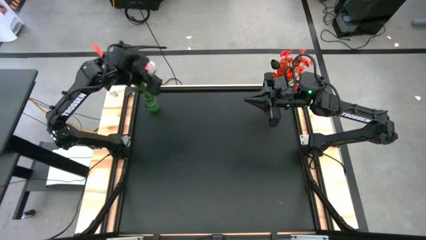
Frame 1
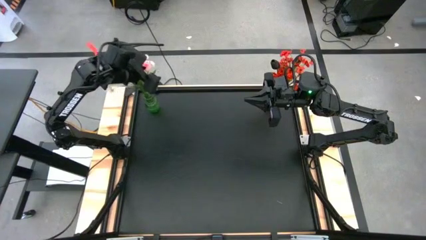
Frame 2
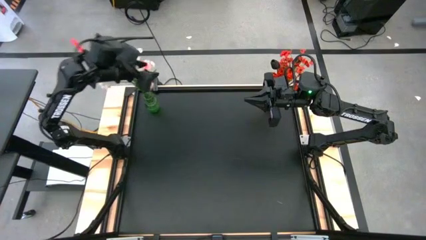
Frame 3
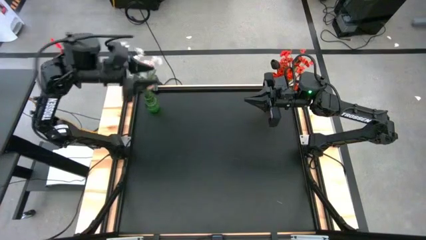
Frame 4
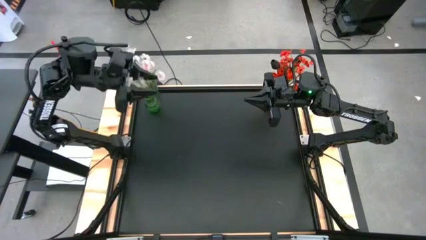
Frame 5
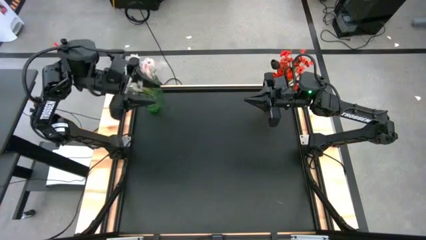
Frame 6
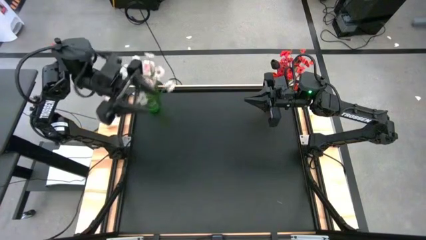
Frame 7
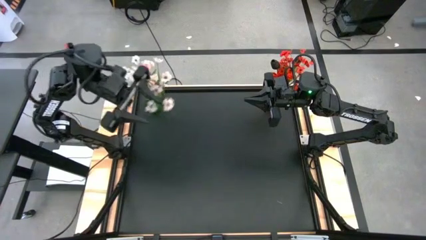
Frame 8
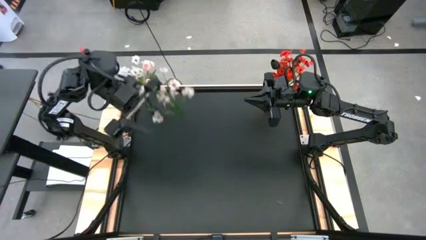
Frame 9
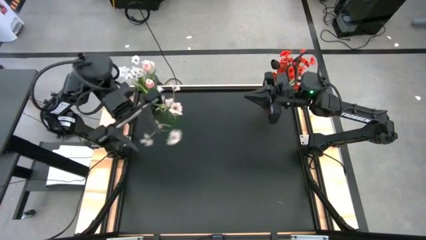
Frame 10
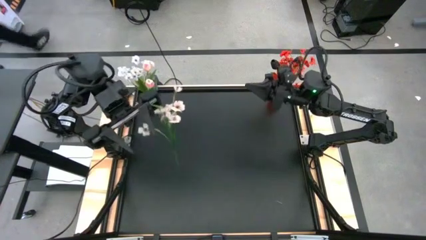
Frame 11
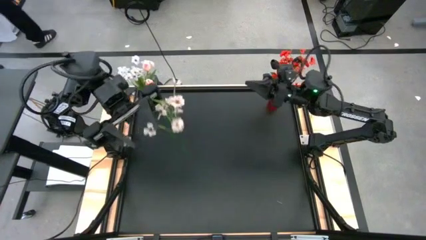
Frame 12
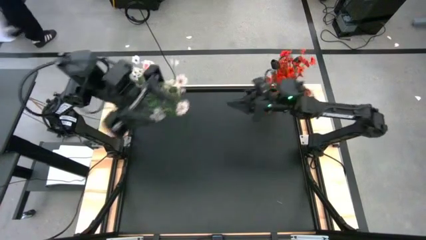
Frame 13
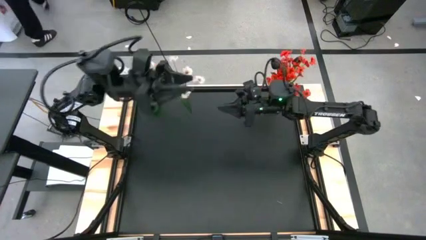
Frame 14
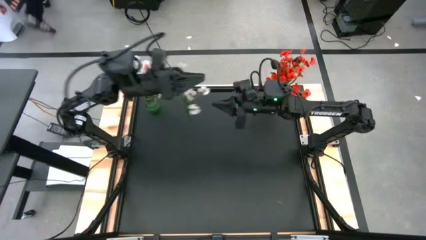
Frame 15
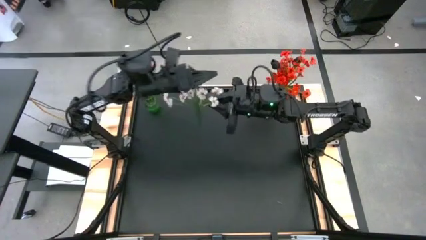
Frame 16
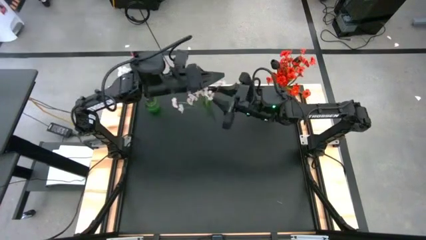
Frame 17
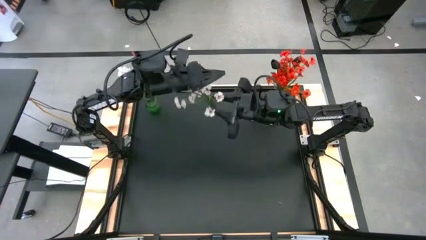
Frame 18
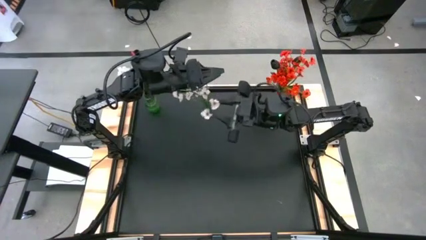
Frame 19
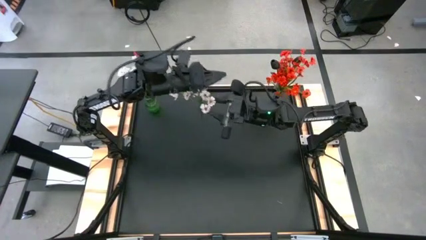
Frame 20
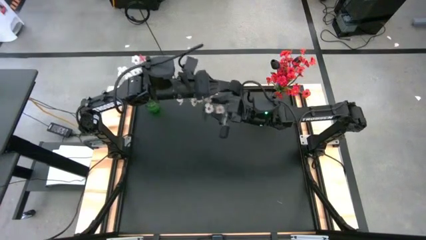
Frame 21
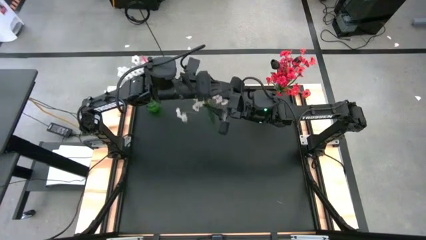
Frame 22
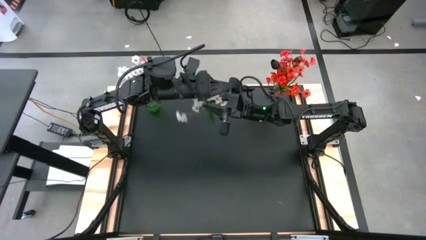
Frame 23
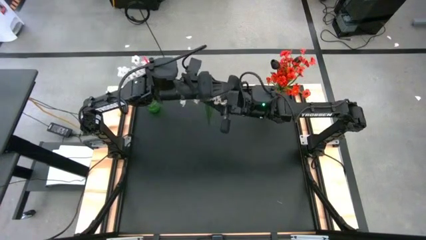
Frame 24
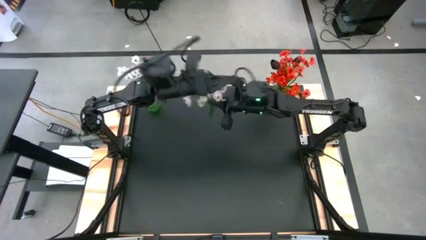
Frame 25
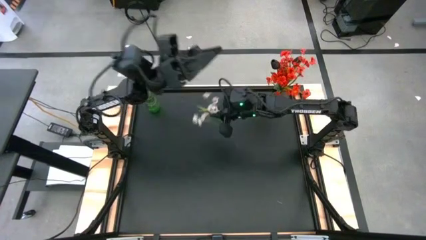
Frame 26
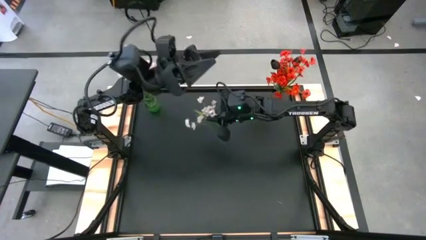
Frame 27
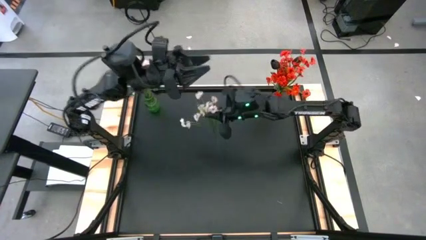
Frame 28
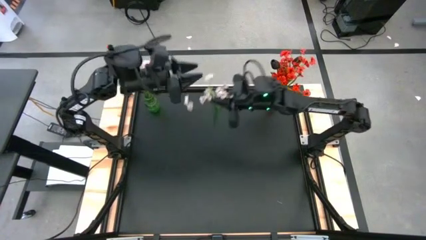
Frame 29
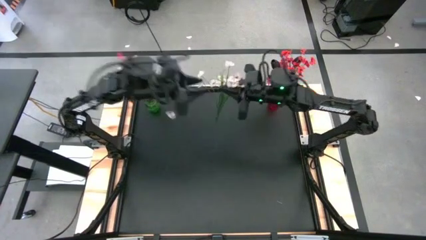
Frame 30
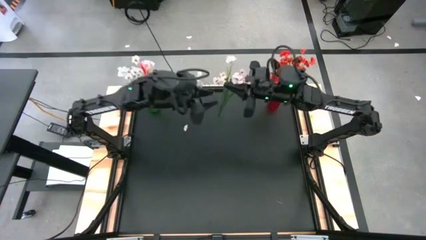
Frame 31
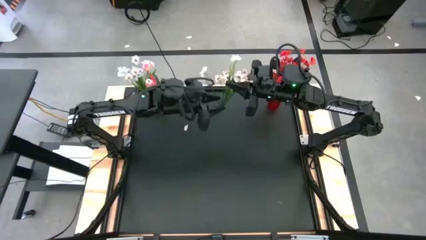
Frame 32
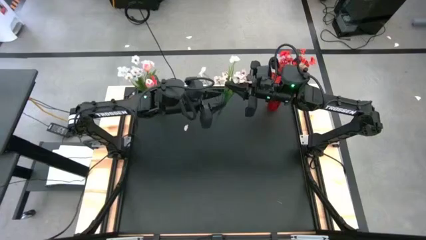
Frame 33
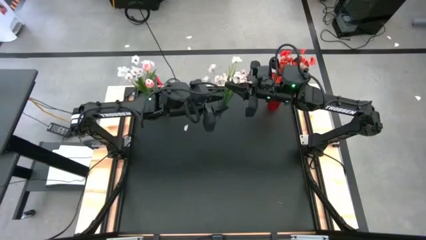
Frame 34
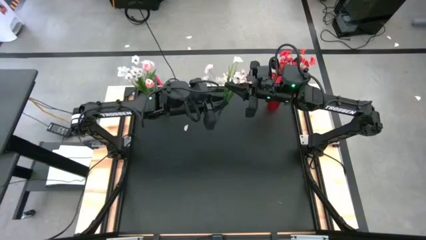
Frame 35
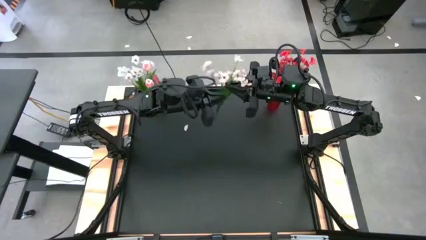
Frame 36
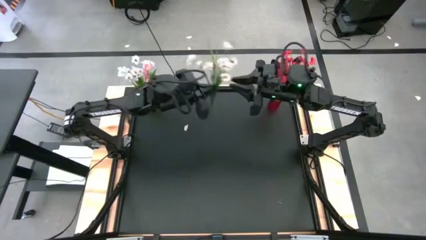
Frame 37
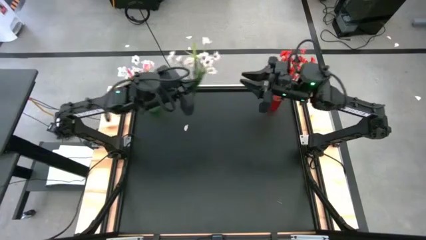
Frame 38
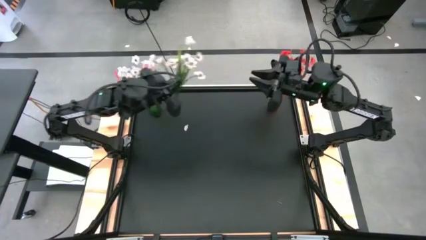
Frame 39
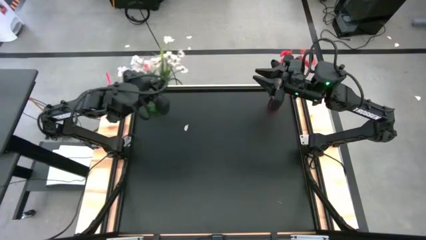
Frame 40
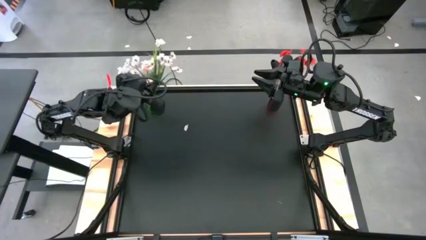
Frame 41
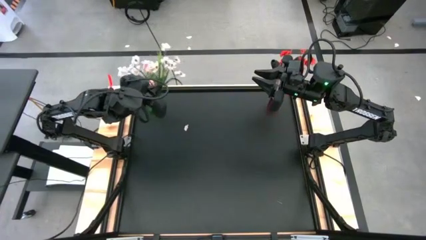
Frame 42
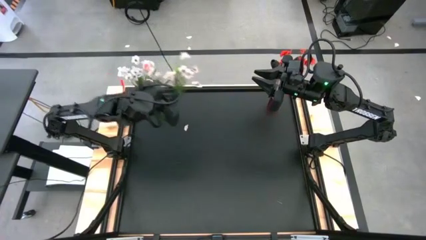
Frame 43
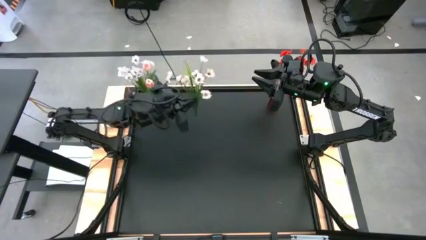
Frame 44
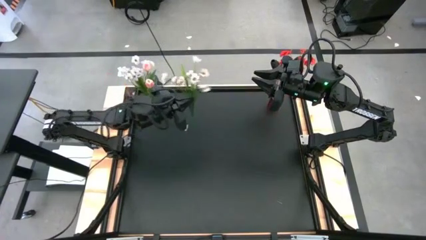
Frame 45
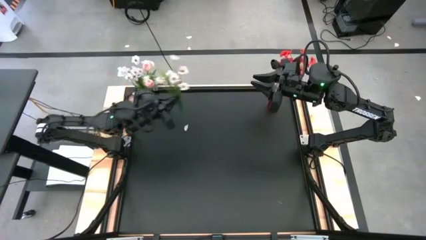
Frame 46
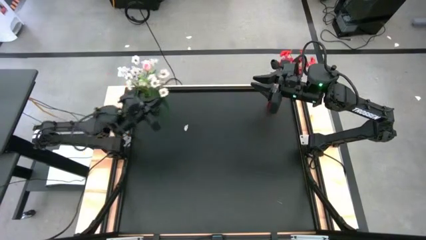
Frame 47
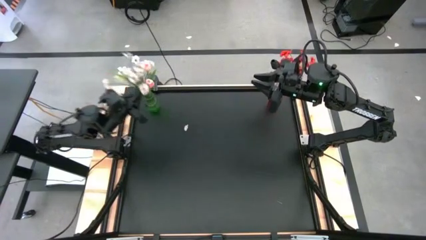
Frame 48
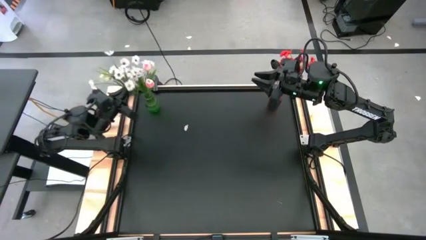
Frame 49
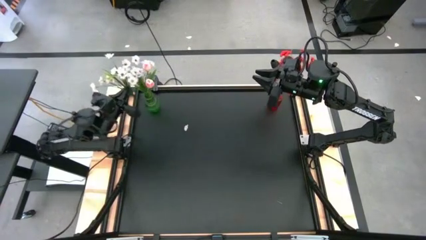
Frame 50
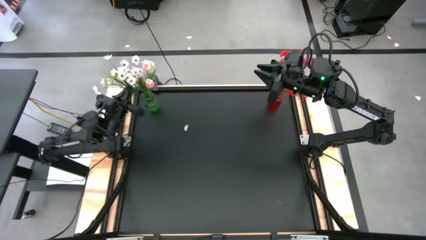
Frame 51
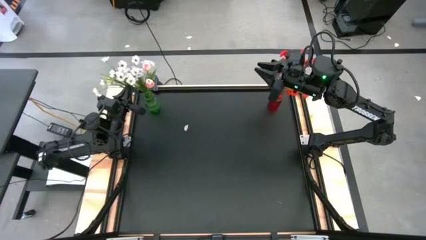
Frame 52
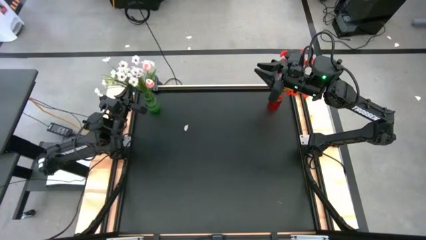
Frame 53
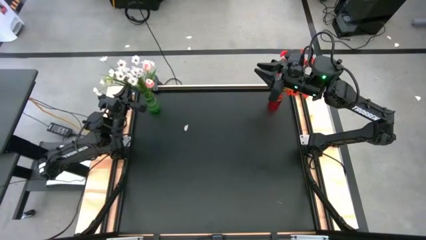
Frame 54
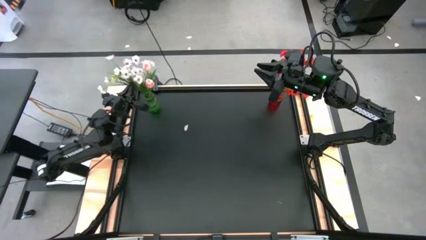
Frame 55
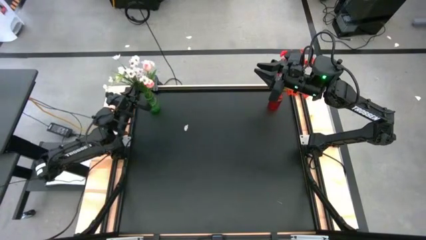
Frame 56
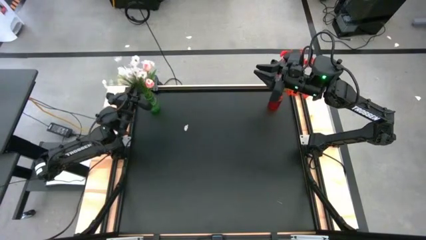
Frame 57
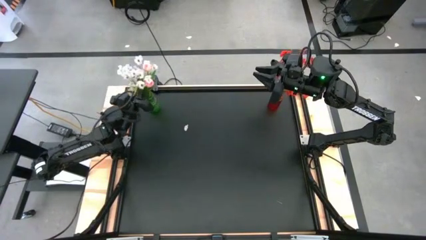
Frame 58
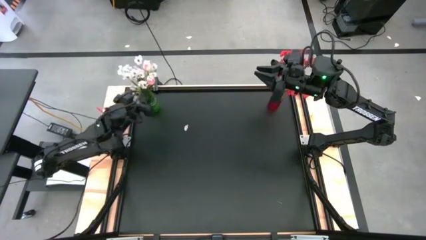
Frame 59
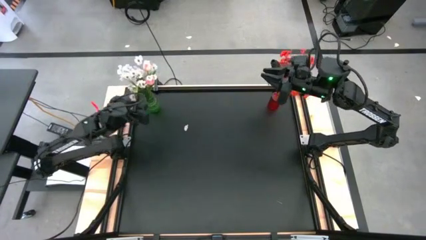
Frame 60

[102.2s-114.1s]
Task: Sort flowers into vase by color
Put the white flower into the green flower vase

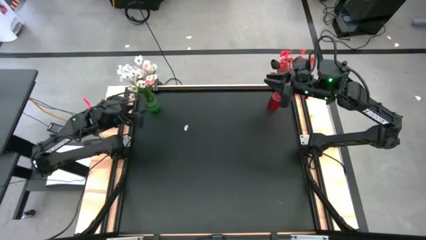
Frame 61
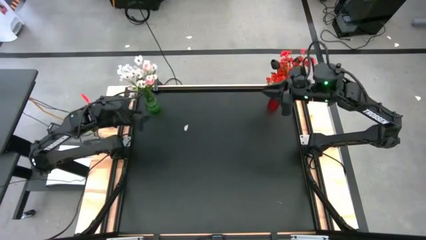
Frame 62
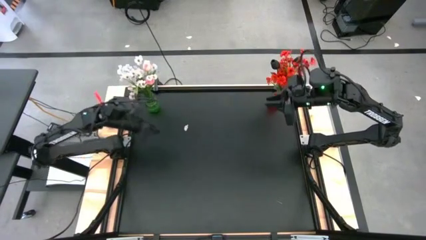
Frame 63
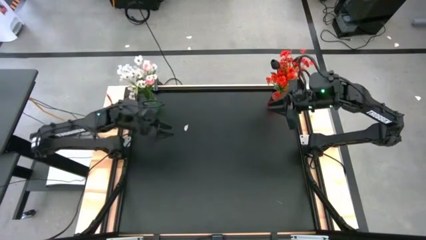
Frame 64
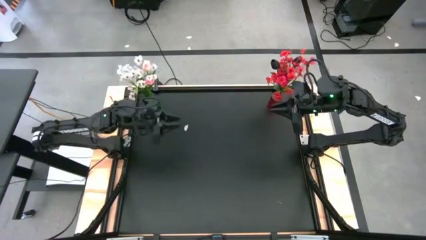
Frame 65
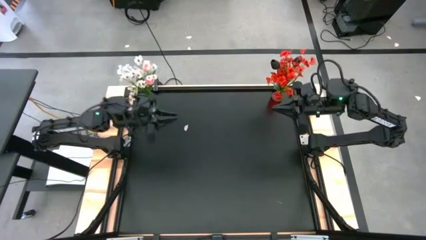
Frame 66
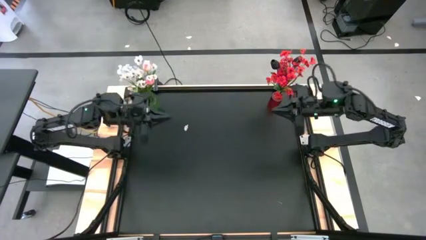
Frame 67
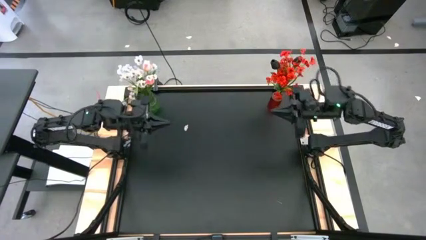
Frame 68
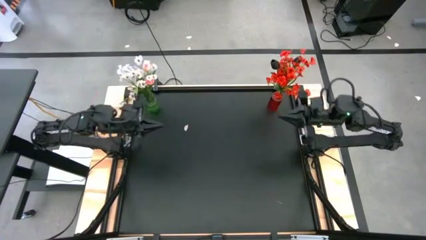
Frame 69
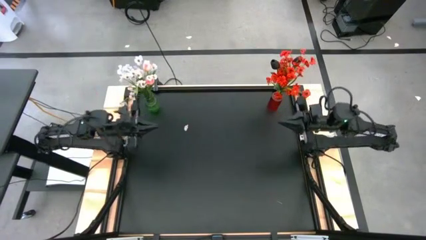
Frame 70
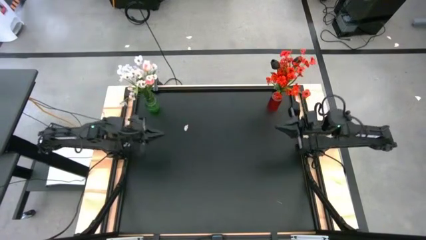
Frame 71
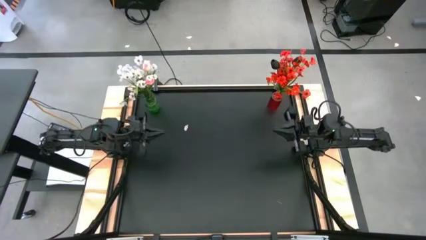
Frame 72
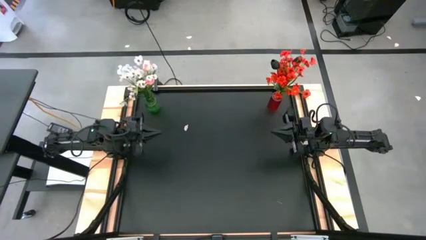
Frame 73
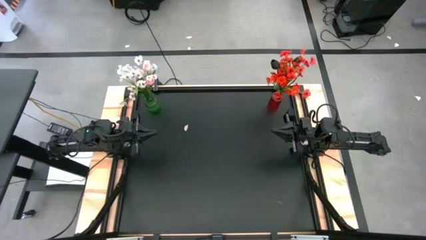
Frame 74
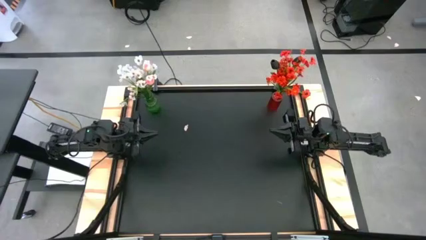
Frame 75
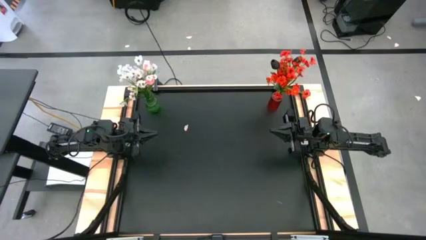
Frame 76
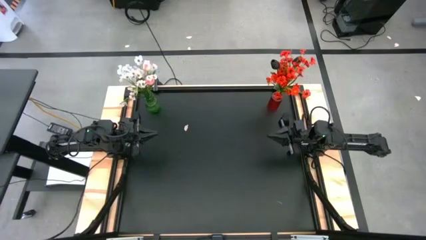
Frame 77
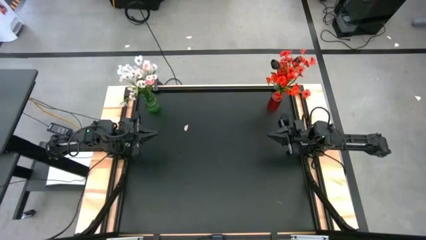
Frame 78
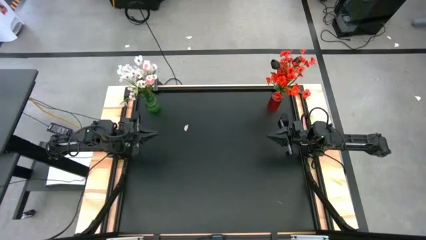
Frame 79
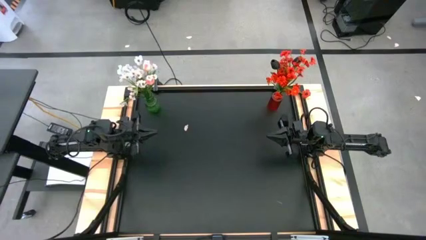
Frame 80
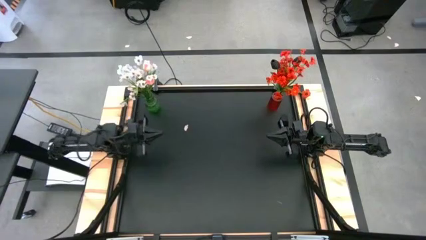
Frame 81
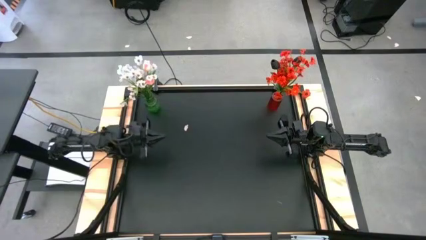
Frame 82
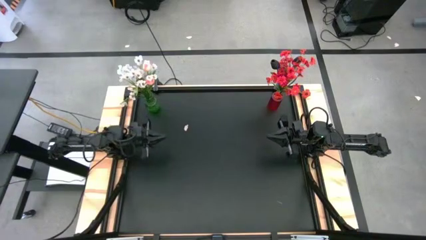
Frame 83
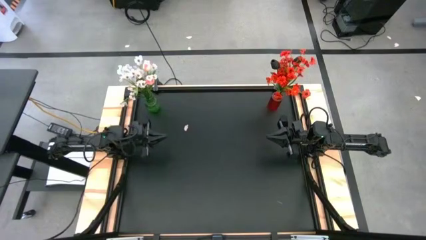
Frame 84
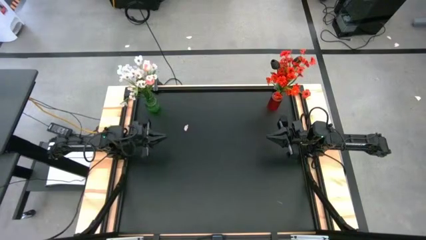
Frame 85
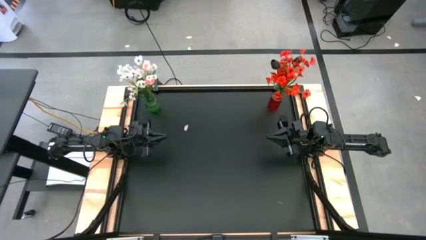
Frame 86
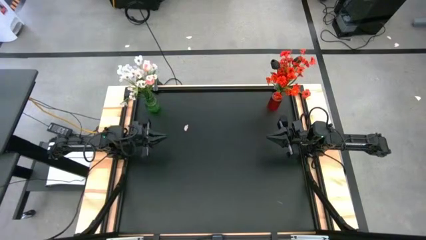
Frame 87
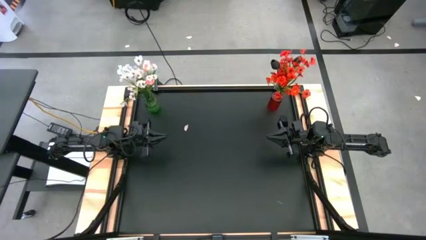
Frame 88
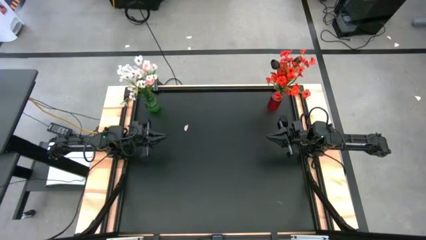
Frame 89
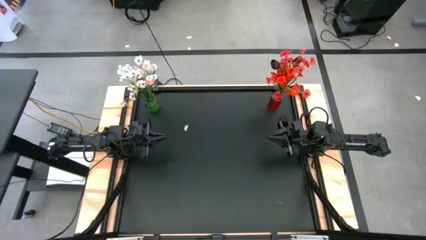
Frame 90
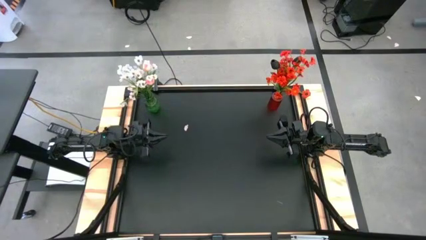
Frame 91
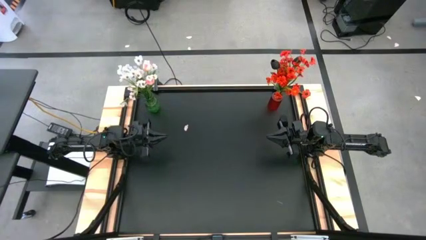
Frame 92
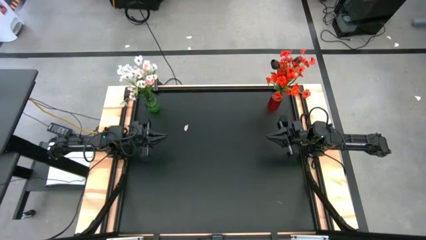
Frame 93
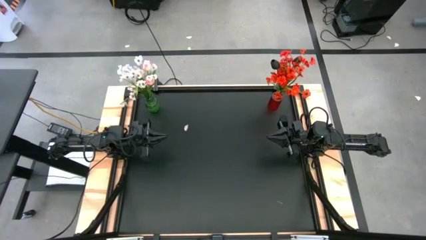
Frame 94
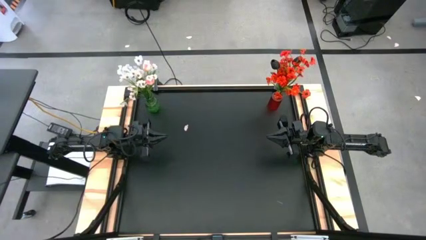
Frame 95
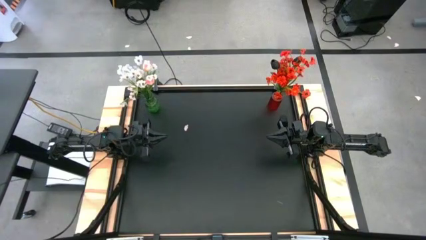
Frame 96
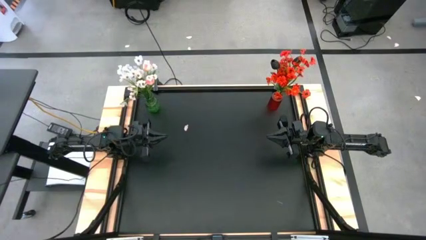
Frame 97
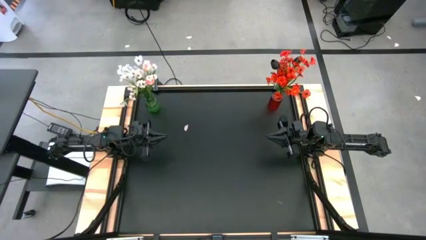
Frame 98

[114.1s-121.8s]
Return to Home Position
